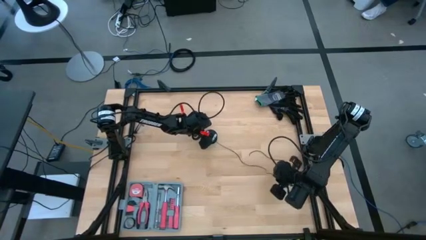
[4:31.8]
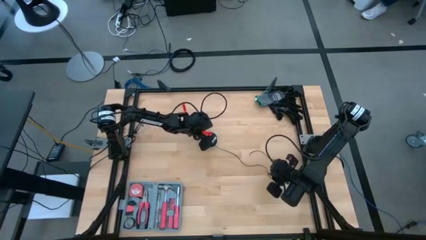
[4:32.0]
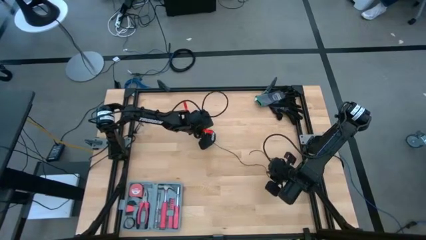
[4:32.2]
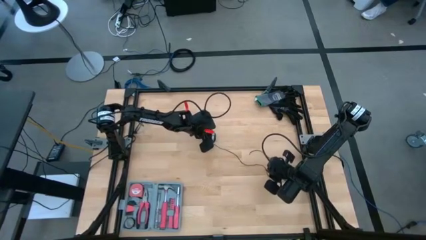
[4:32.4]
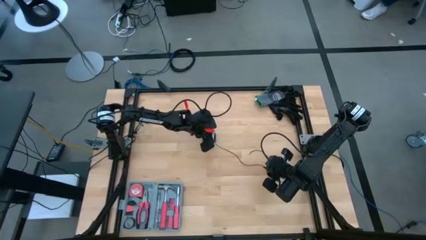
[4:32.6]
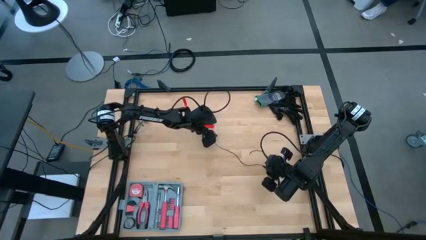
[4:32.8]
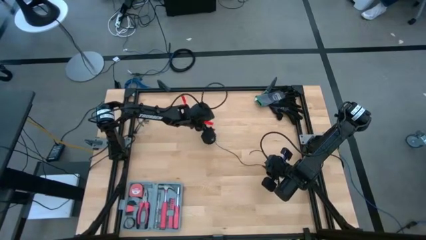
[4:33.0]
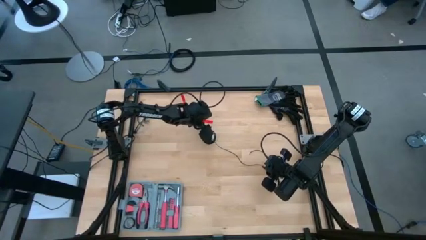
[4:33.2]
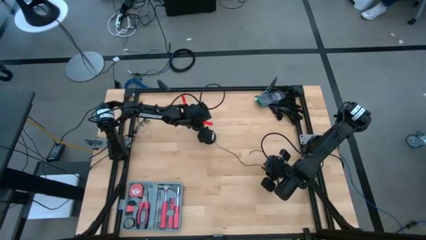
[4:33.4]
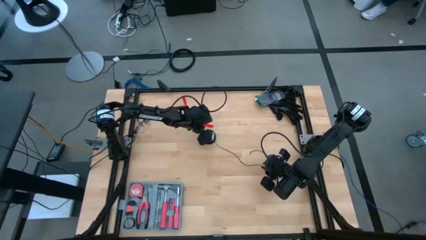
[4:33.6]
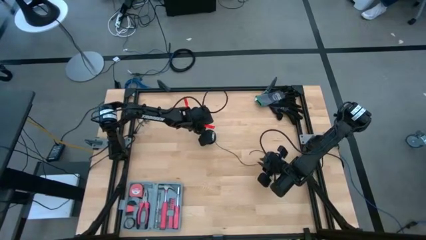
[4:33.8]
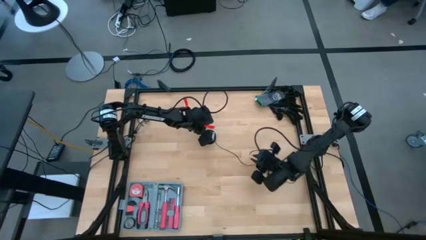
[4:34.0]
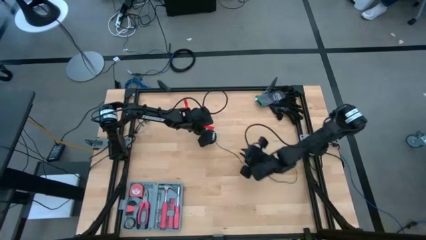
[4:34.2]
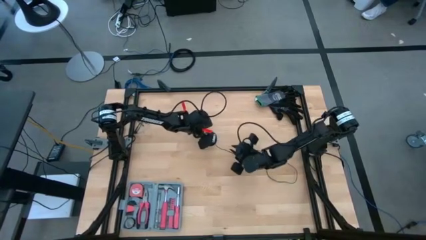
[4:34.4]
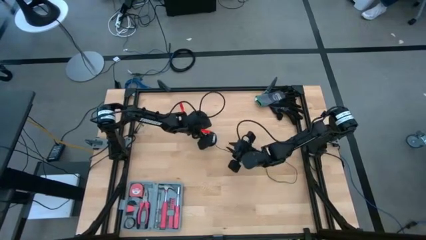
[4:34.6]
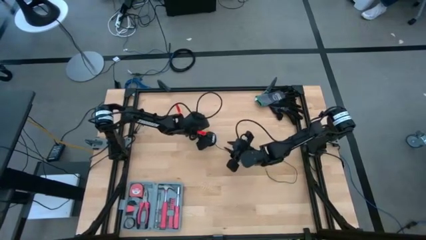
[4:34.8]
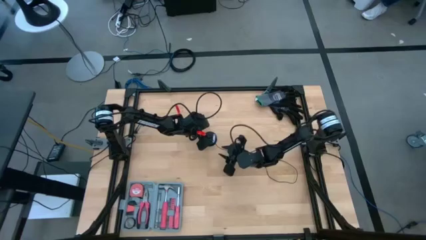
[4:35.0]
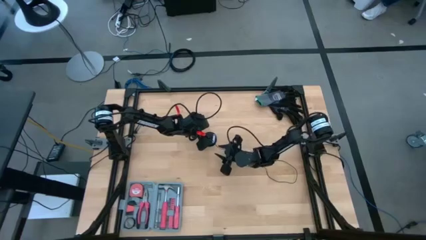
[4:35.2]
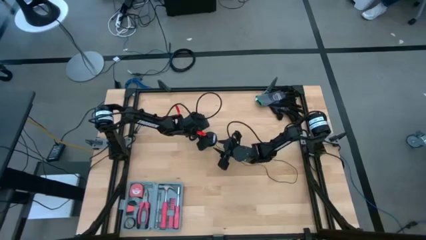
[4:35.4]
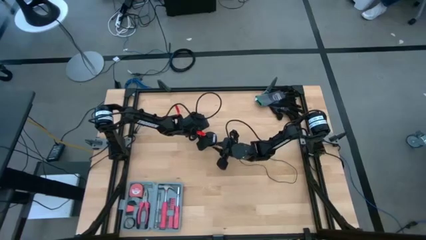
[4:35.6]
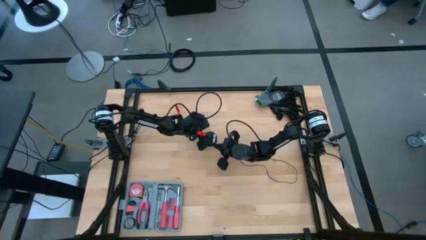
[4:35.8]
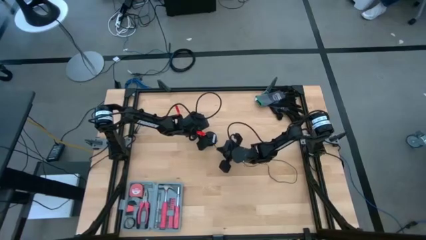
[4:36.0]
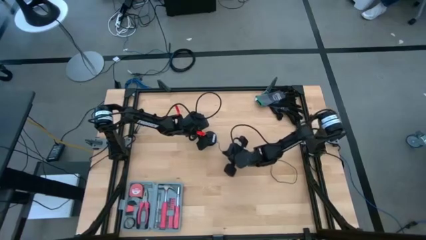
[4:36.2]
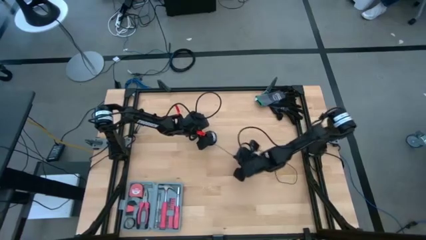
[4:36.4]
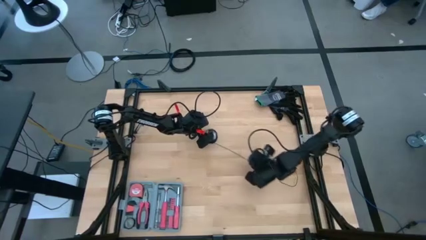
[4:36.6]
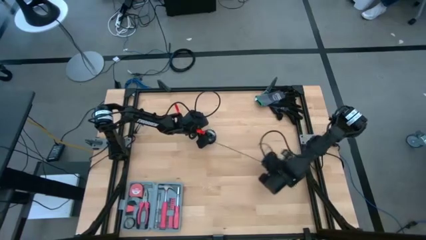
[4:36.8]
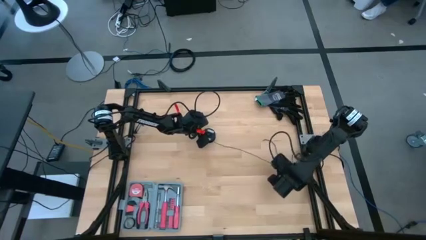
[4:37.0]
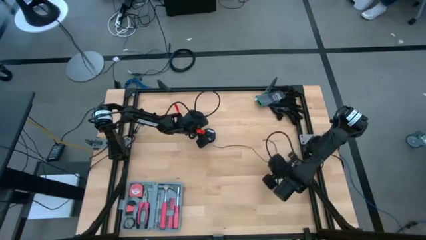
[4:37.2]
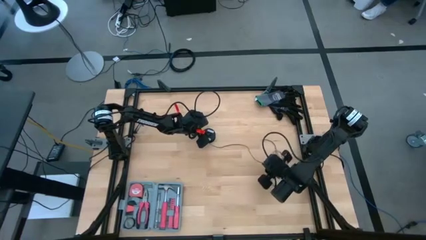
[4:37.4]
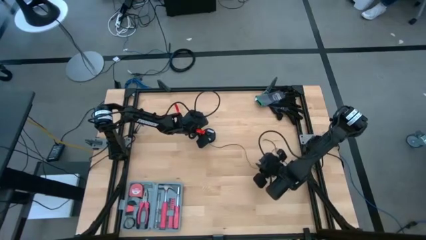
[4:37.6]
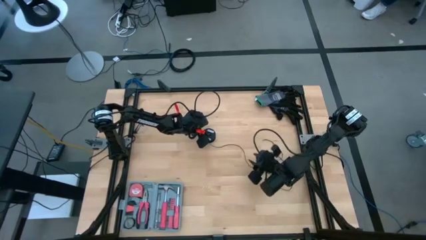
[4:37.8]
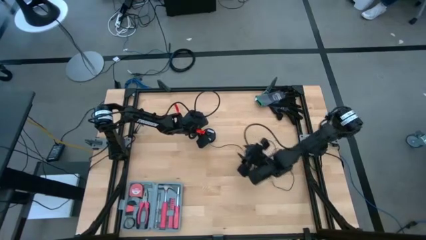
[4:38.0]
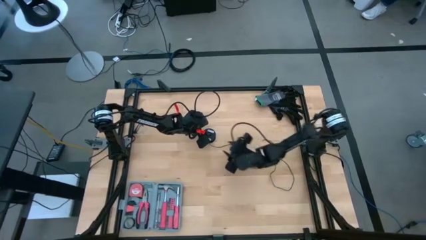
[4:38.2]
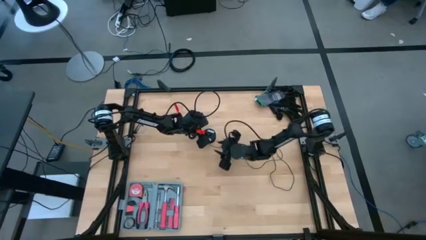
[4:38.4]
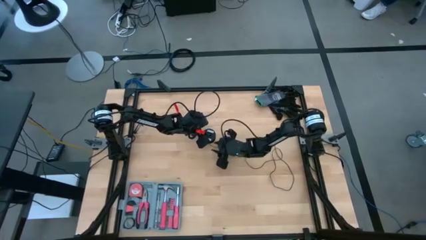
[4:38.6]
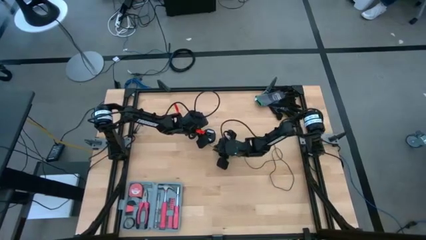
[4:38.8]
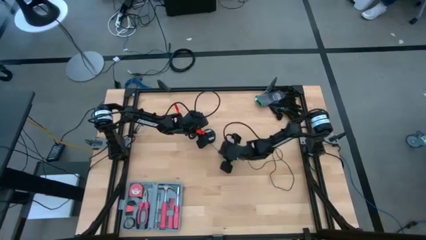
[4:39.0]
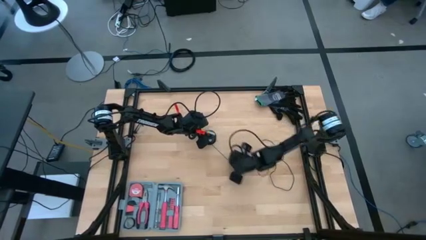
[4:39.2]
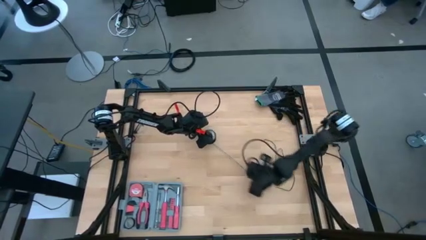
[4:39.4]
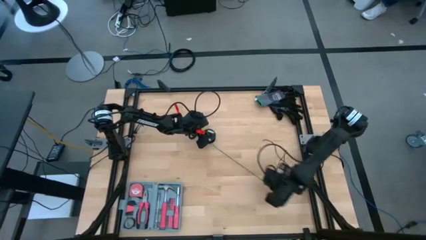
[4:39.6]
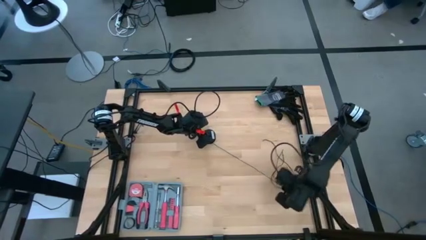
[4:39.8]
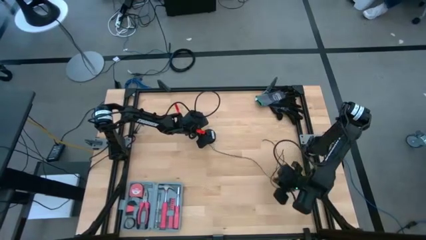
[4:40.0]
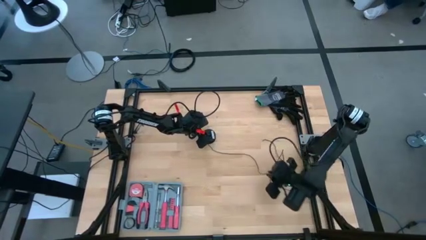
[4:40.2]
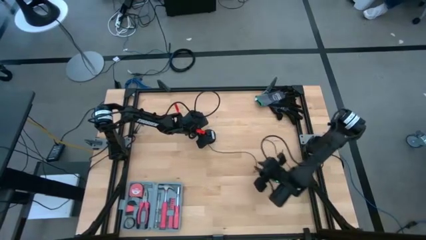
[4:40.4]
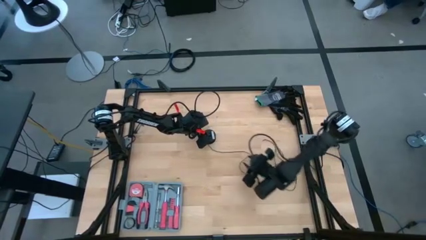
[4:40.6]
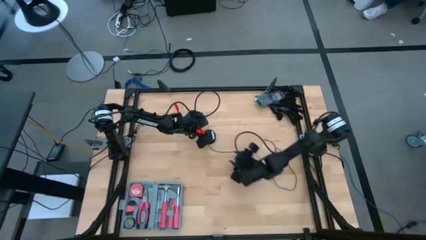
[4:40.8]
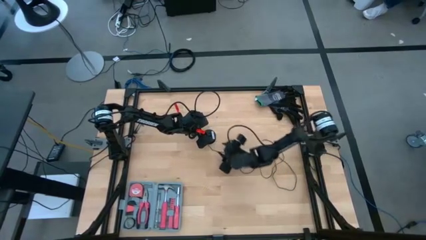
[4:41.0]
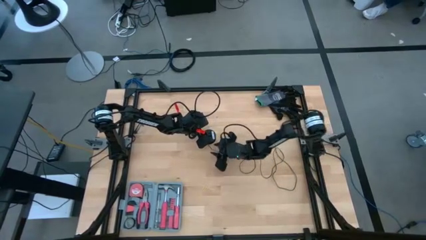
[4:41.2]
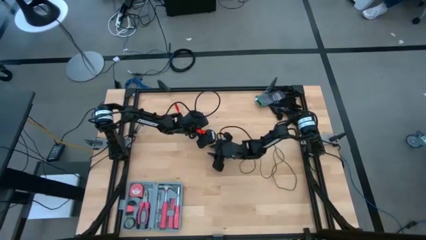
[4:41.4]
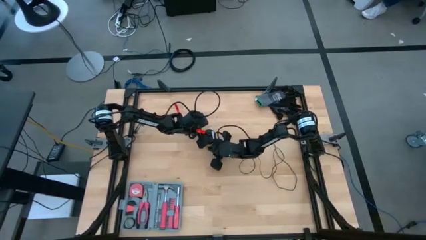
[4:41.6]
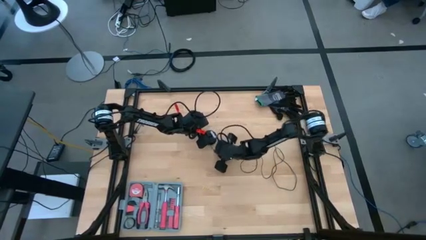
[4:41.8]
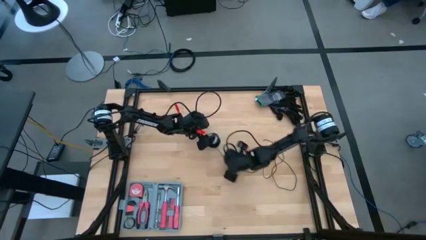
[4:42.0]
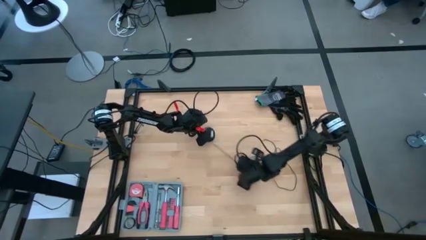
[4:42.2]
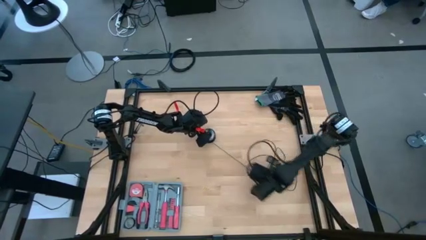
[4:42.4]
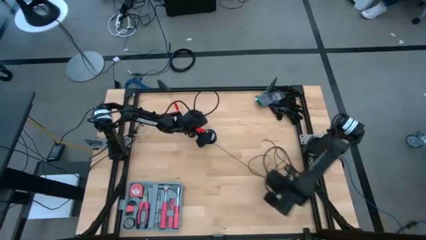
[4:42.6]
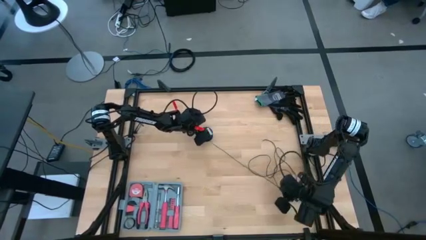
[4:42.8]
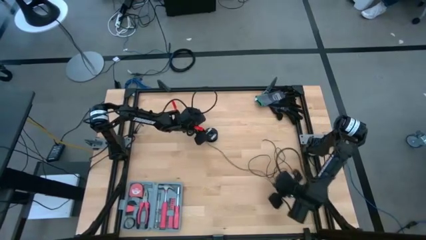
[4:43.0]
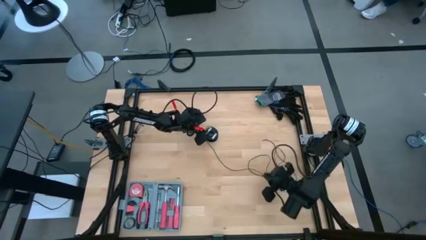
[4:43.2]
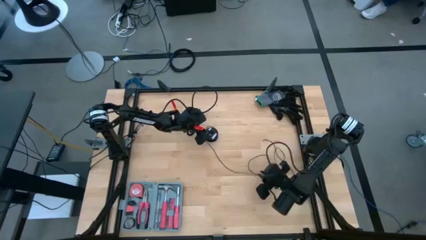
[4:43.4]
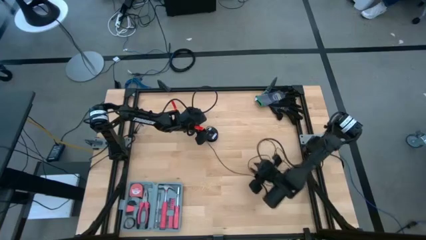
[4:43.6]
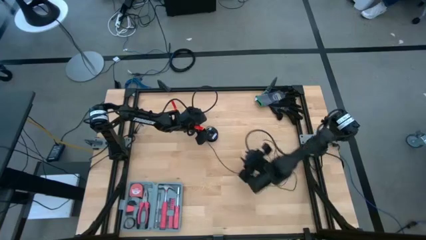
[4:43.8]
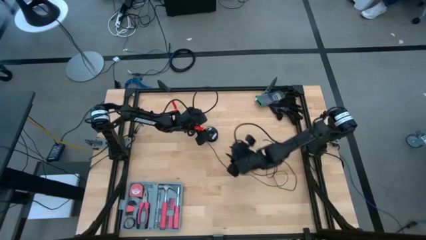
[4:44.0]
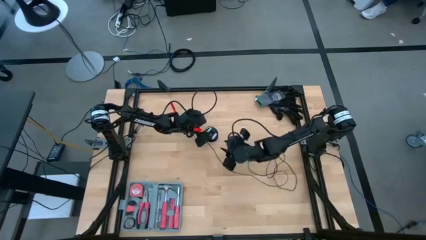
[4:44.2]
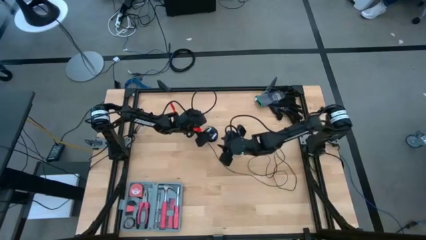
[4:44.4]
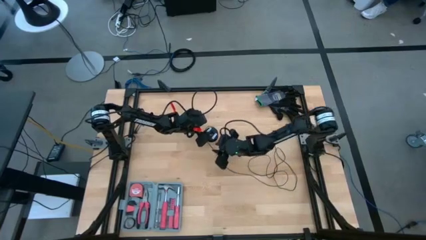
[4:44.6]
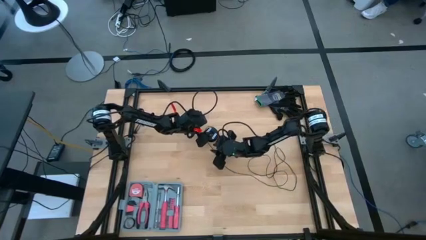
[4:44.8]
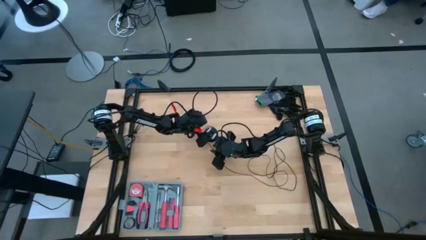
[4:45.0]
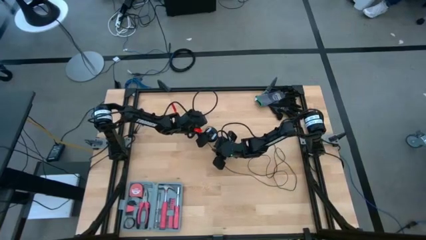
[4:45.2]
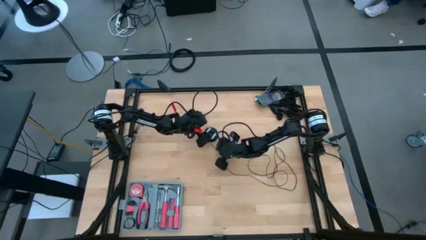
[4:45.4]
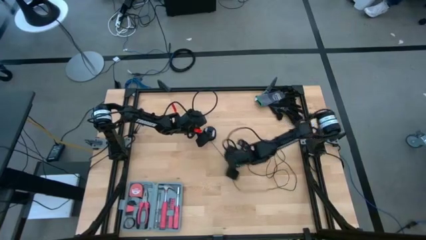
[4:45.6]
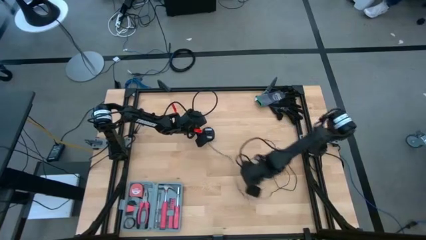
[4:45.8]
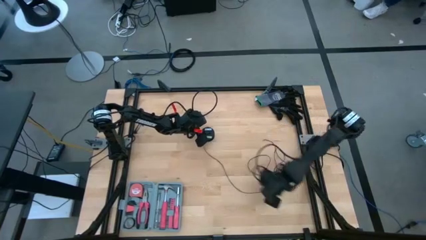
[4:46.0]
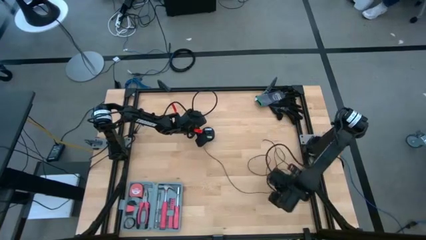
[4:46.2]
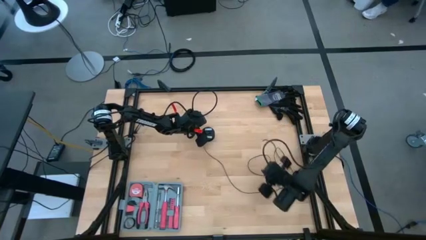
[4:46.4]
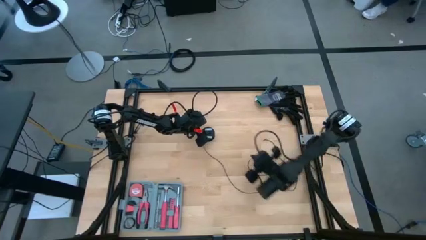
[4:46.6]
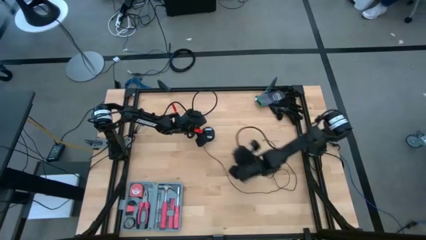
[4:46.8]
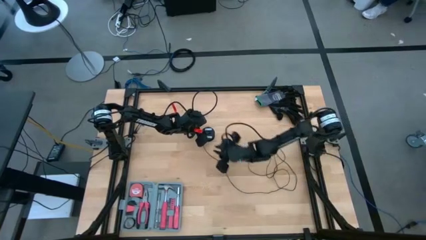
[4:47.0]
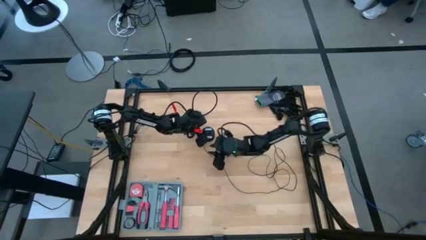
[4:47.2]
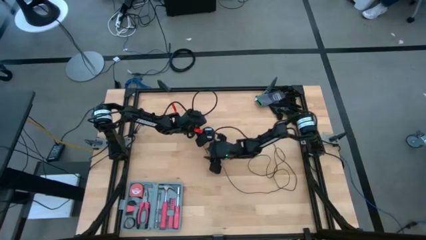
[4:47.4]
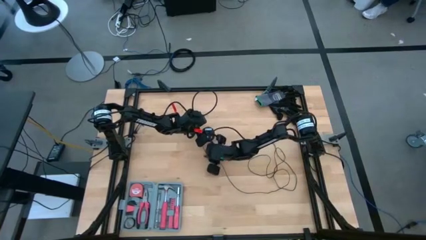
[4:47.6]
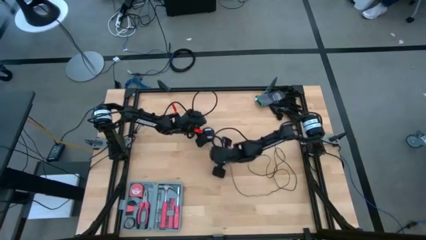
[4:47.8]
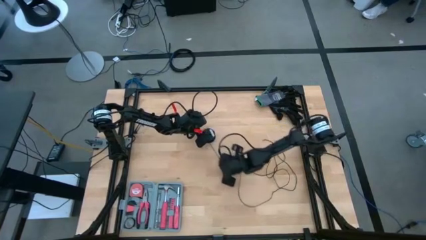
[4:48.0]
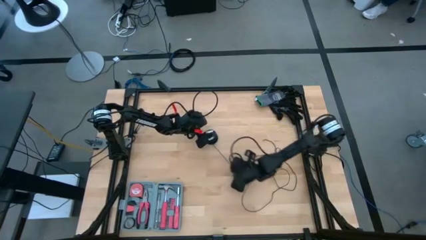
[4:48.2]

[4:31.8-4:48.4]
Task: Coil cords
Uncoil the black wire from the spool
